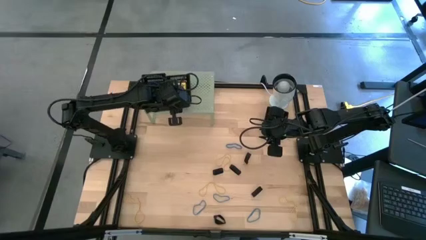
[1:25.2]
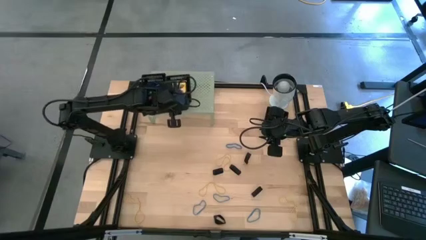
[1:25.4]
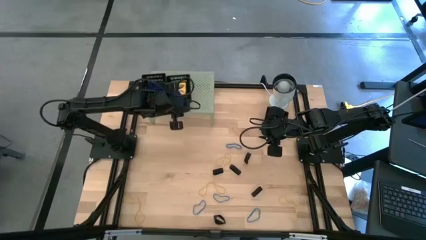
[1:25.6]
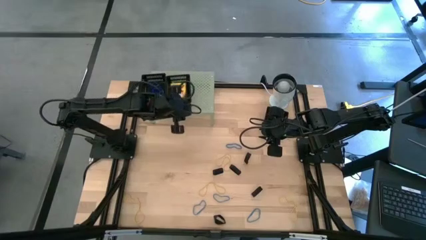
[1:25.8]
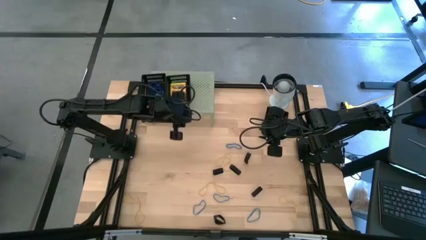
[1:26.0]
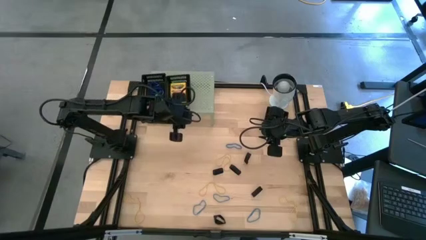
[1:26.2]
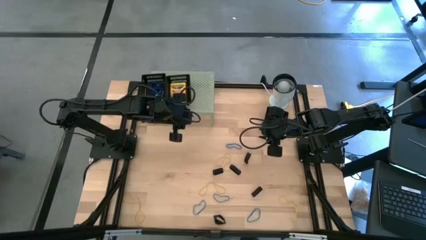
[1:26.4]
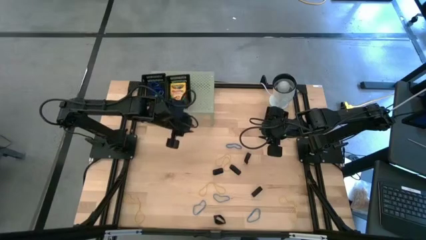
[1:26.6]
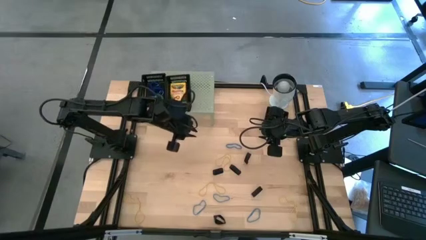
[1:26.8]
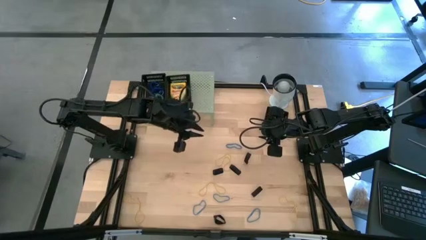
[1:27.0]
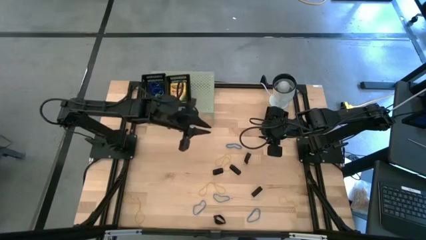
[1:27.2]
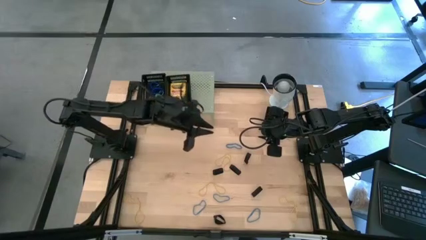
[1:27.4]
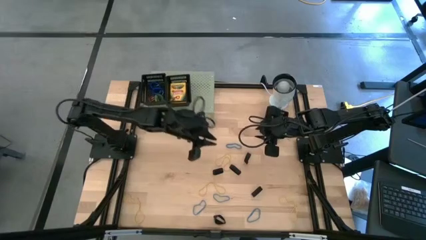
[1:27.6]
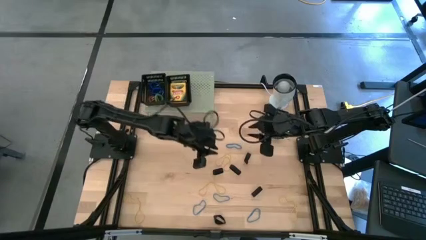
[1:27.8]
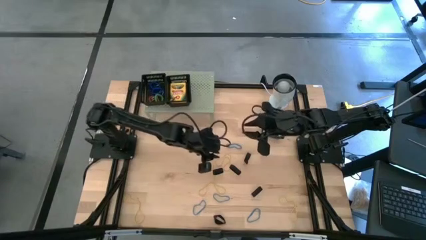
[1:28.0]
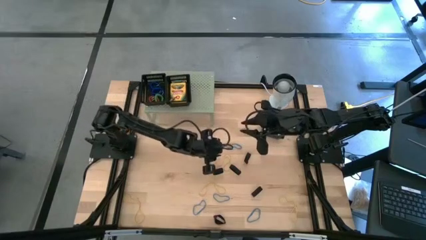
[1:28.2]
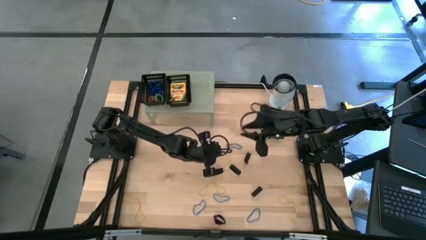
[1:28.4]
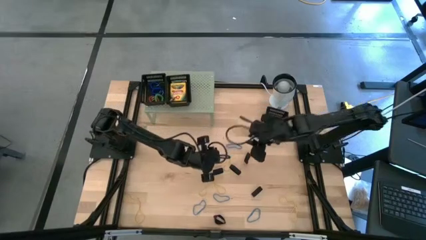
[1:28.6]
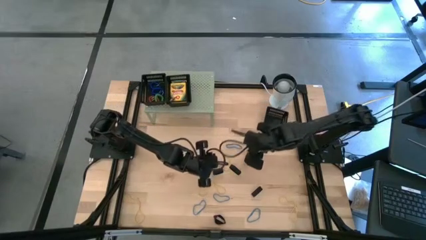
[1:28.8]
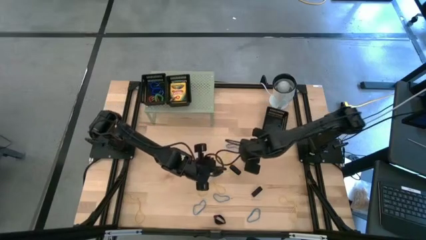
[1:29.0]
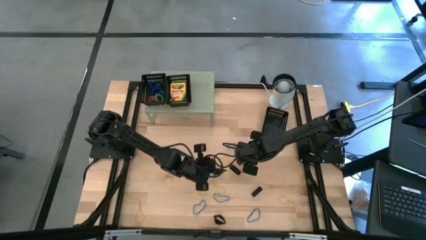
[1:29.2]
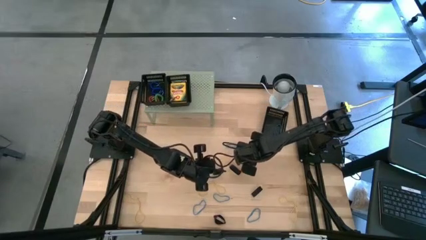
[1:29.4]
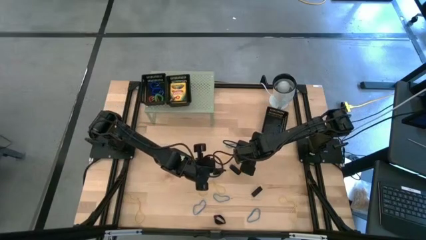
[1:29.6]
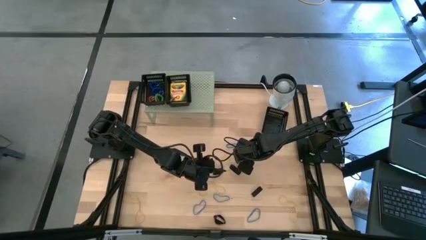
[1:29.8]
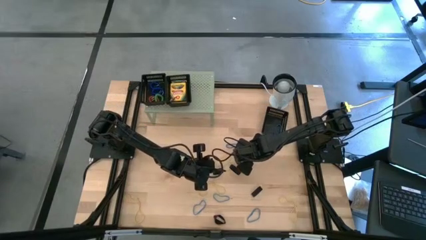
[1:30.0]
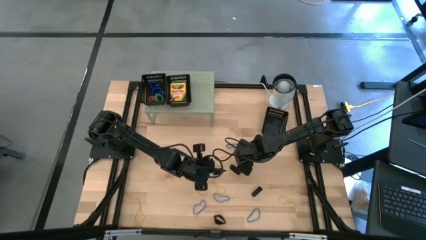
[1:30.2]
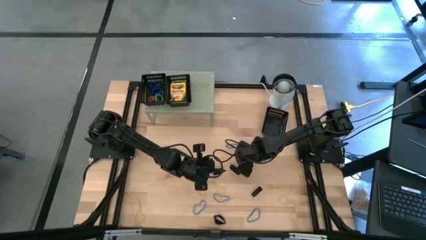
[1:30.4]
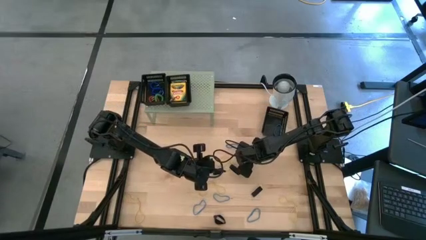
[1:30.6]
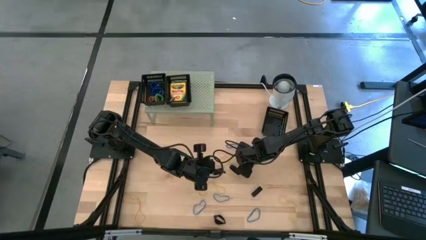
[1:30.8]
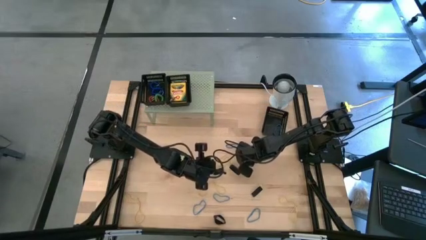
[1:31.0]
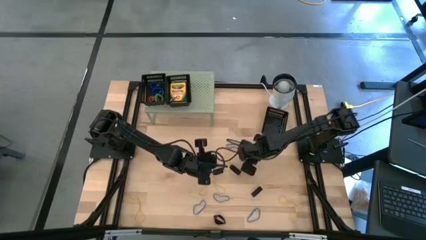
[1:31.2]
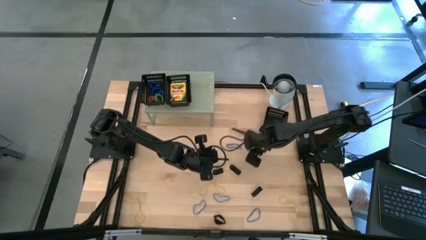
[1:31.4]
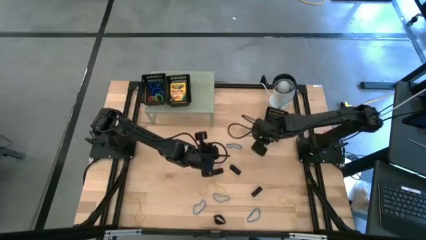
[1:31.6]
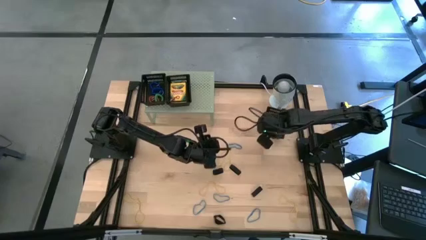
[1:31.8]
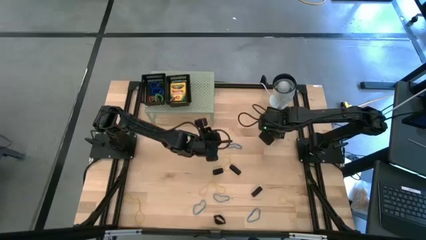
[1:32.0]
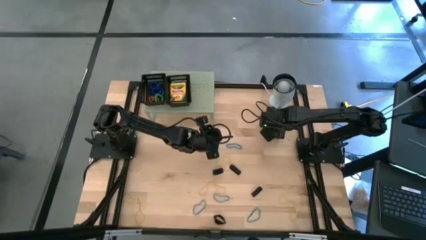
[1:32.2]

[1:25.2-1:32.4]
Task: Pick & Place Office Desk Supplies
Put the black rubber band into the black bin

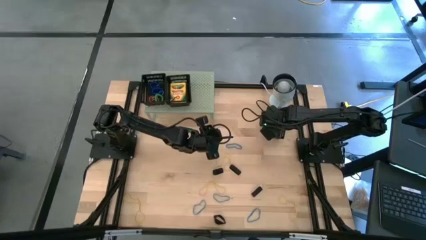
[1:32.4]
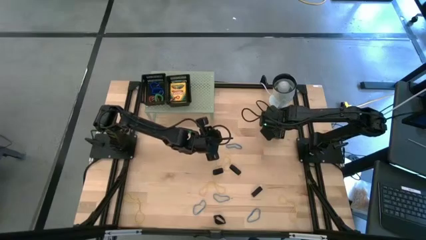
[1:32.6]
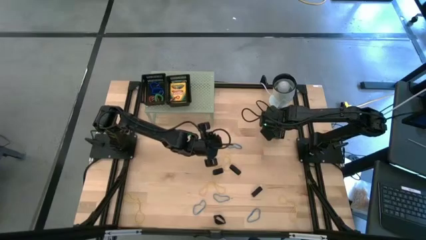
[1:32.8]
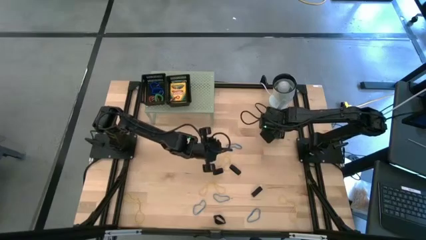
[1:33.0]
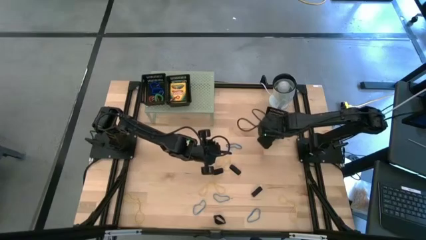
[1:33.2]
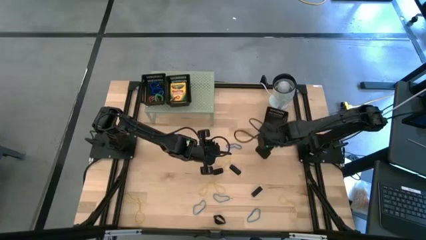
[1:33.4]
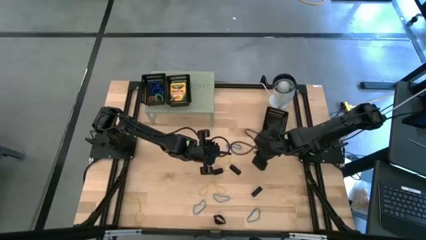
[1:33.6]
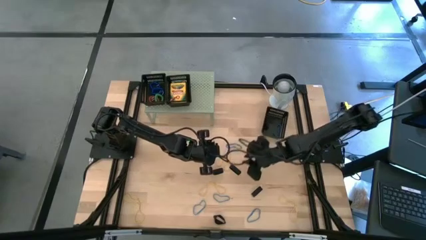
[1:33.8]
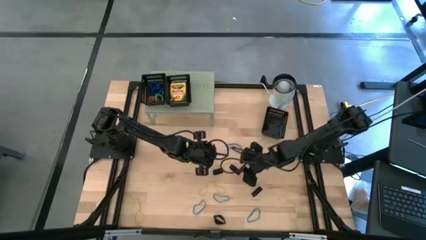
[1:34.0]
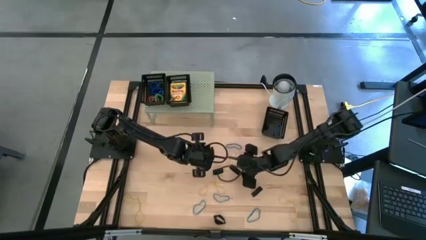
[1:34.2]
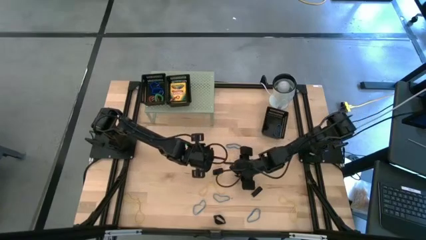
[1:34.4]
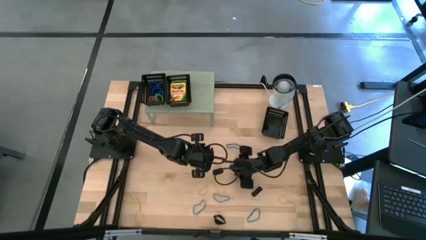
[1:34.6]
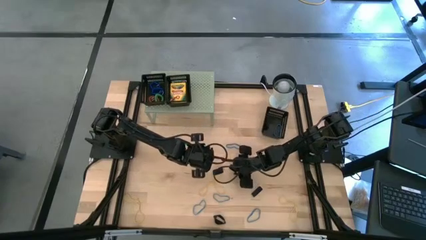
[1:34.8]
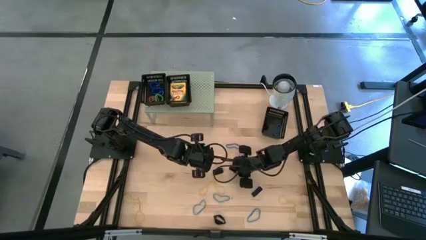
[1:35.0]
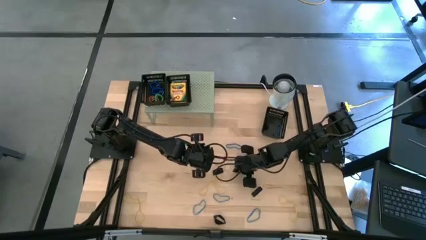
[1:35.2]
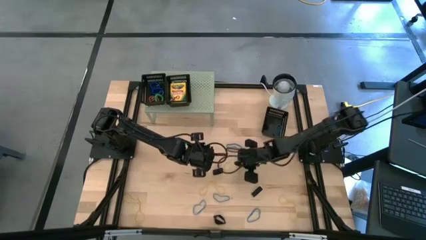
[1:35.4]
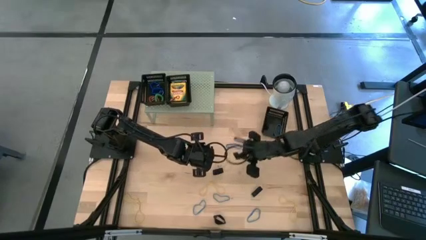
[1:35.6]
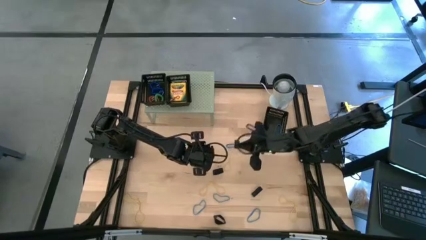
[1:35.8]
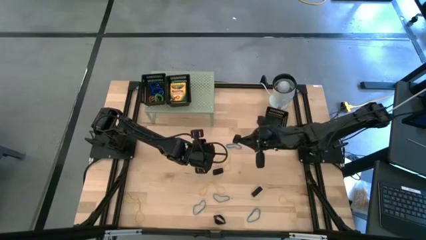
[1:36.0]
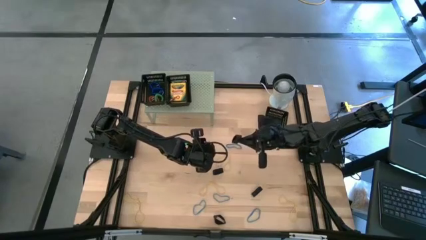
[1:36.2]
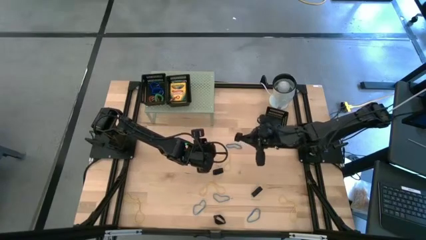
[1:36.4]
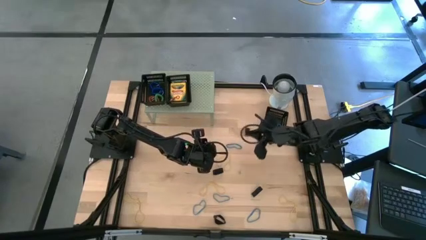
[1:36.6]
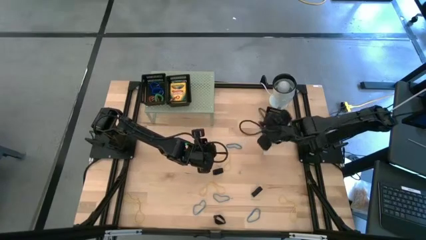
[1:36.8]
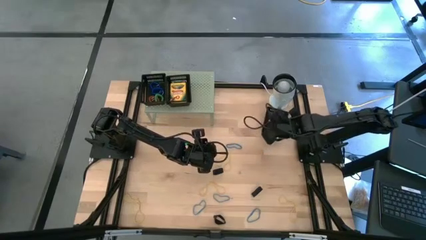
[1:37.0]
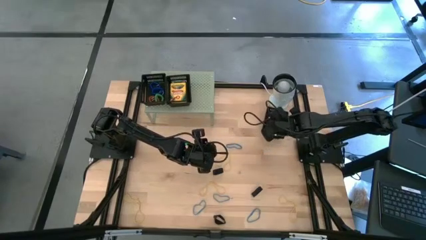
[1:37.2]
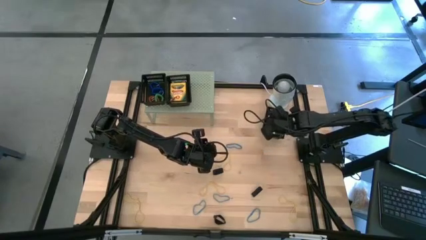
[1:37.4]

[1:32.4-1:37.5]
Put the black rubber band into the black bin

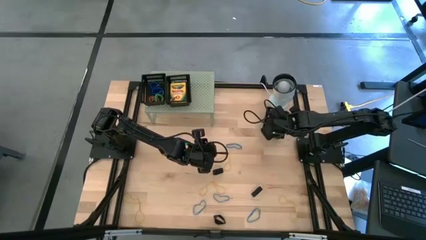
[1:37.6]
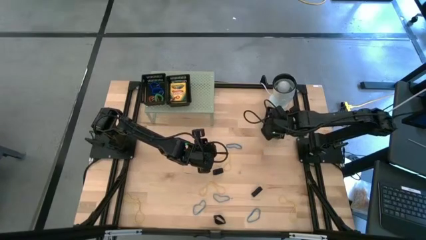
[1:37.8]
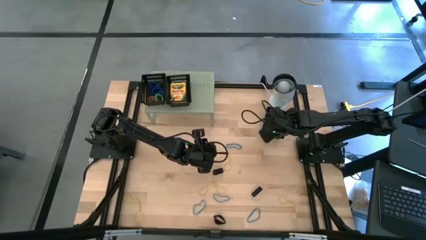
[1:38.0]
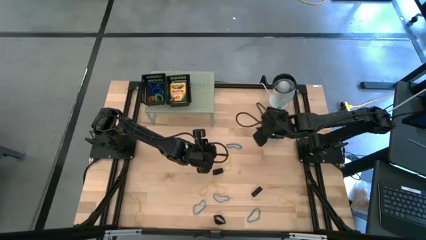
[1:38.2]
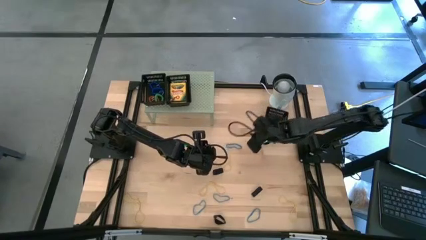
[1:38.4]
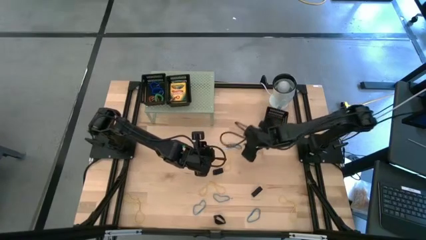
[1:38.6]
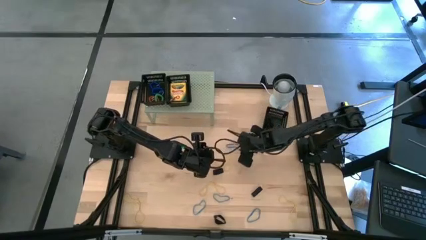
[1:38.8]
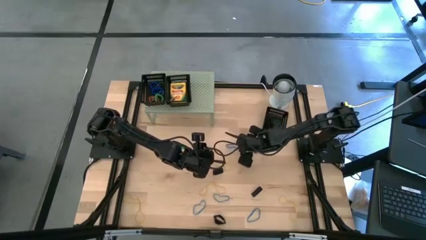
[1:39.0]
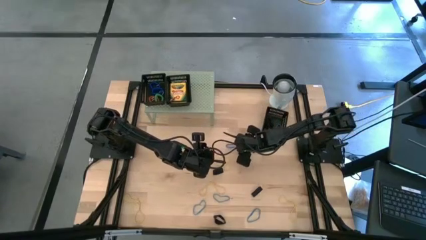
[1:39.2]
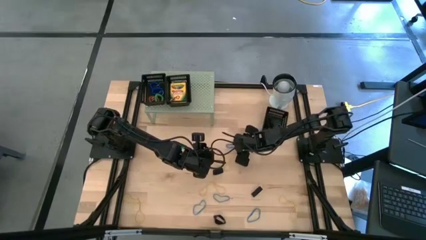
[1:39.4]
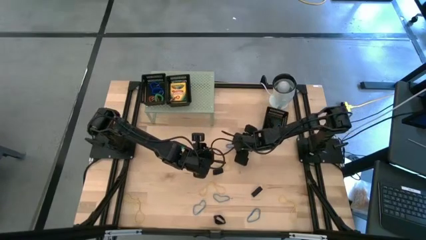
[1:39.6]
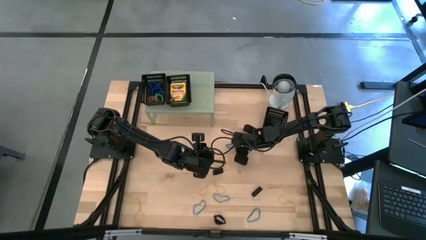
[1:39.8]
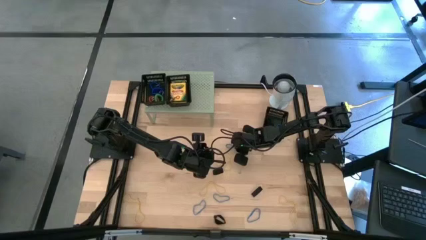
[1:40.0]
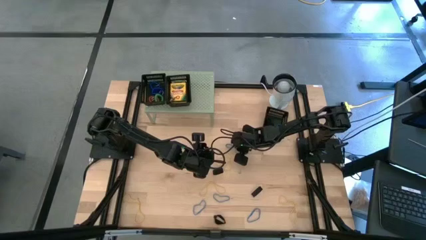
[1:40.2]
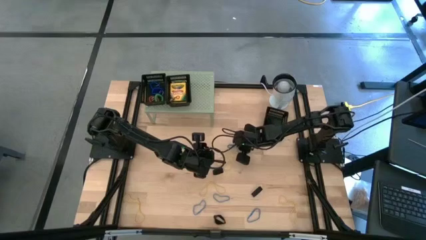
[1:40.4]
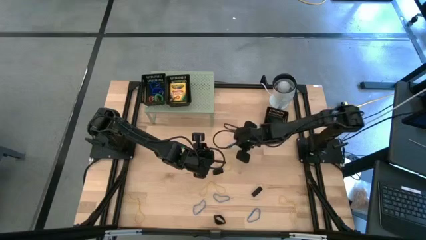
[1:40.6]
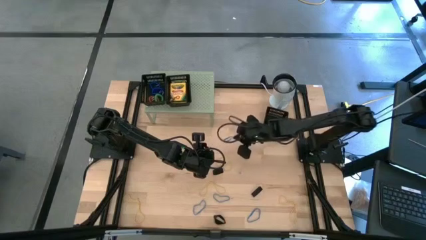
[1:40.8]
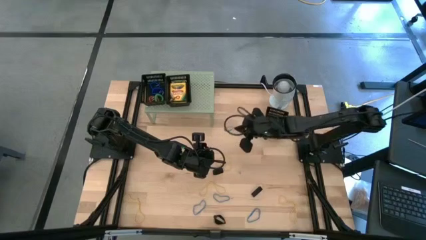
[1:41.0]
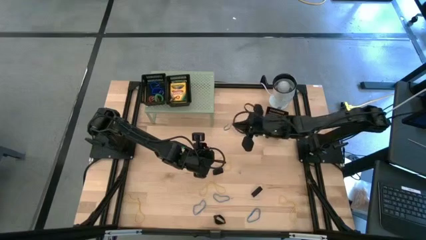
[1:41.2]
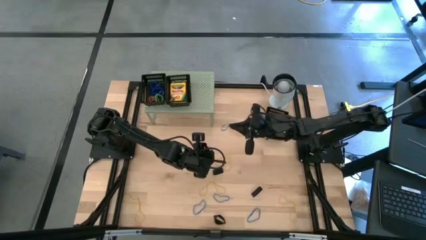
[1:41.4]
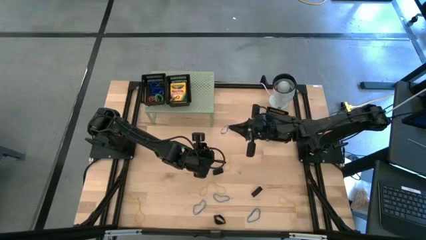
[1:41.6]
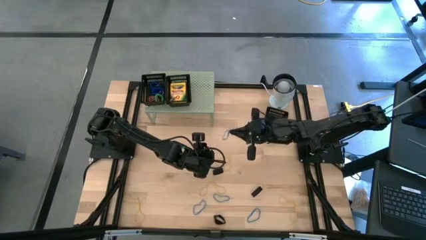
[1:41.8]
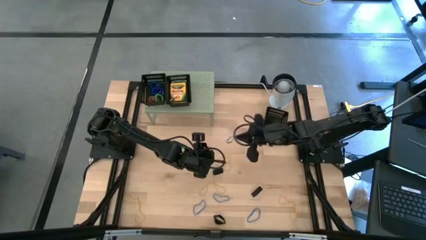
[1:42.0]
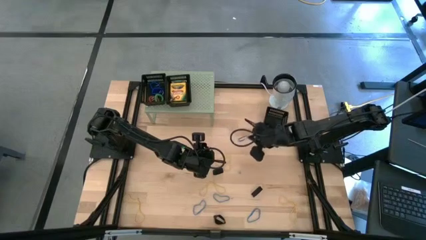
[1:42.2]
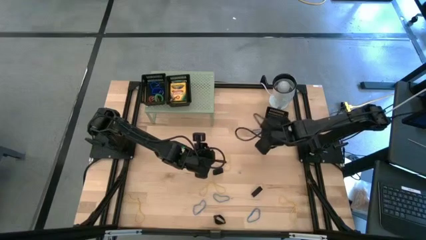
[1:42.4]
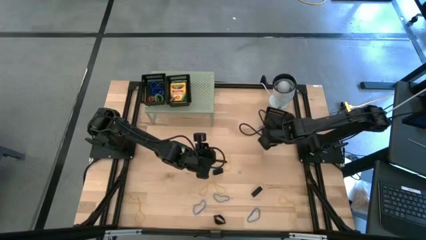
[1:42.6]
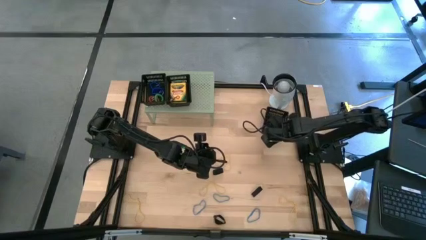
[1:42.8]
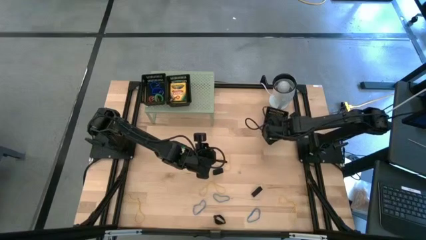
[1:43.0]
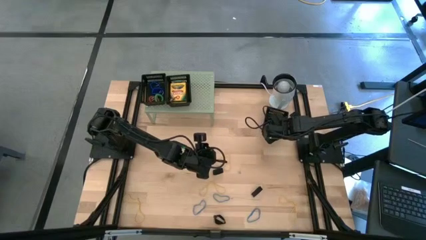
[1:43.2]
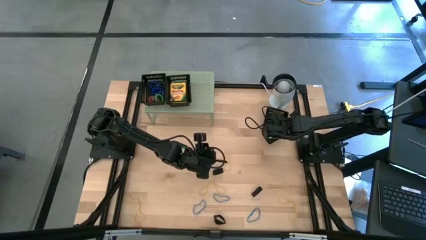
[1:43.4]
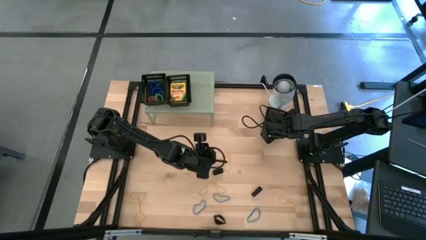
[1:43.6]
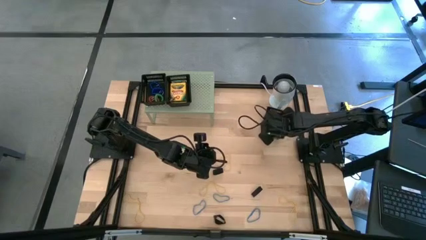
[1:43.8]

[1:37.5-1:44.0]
Put the blue rubber band into the black bin
